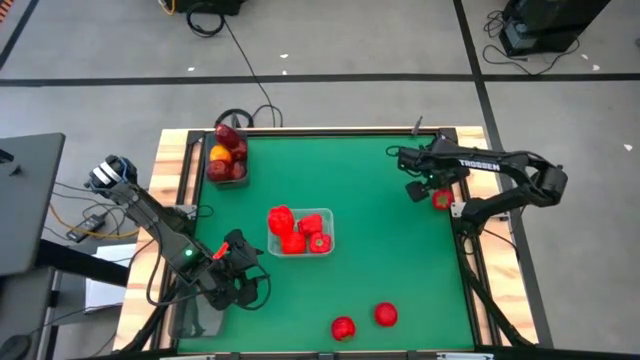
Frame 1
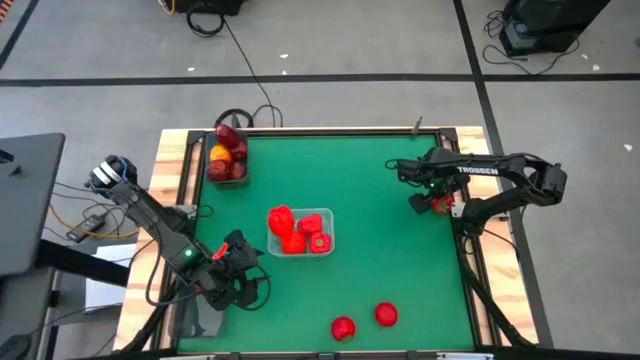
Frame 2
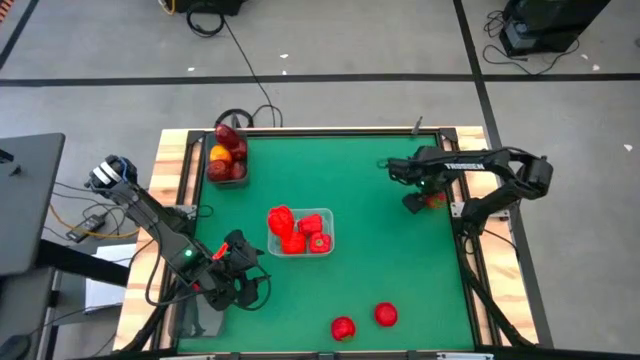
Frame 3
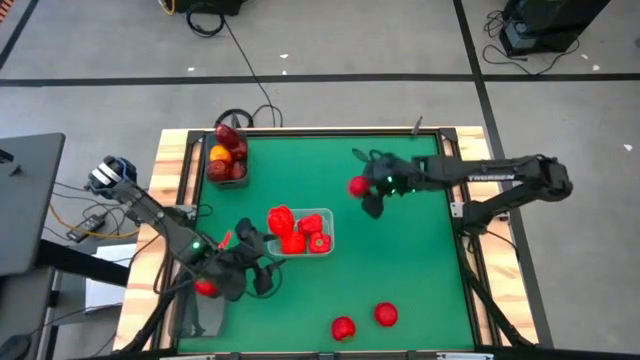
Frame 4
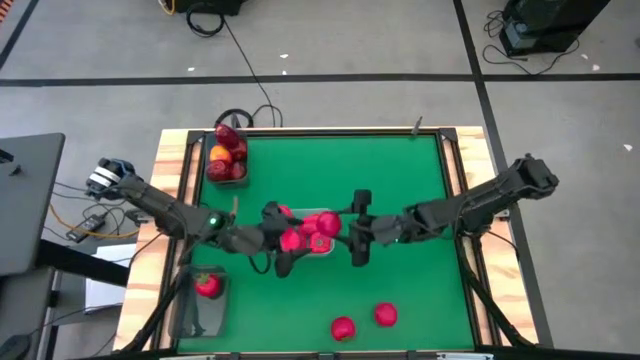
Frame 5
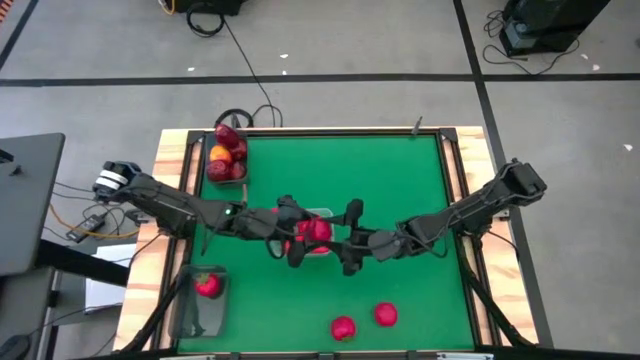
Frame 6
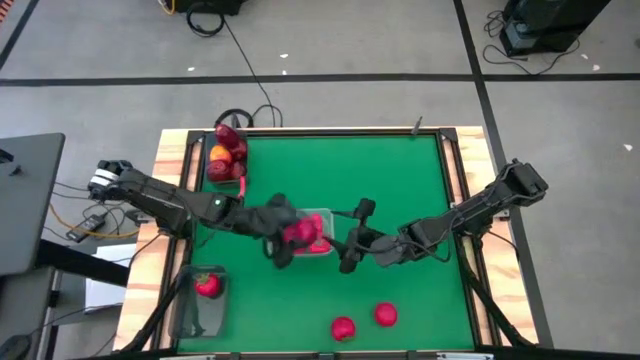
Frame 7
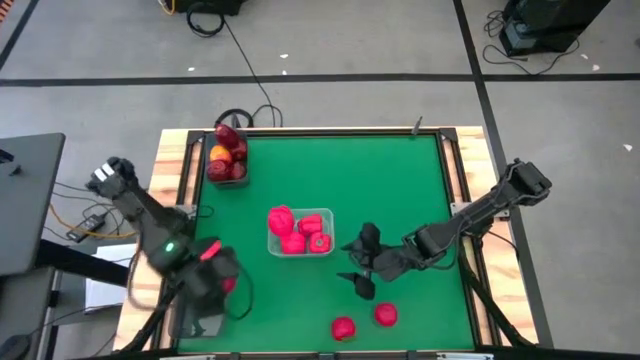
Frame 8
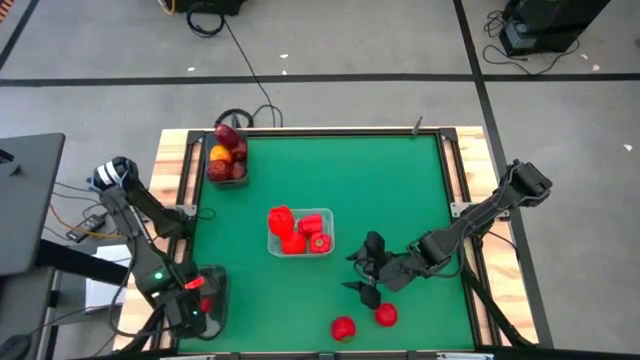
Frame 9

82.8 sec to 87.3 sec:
Task: Sort produce into baskets
Put the red tomato into the bottom black bin

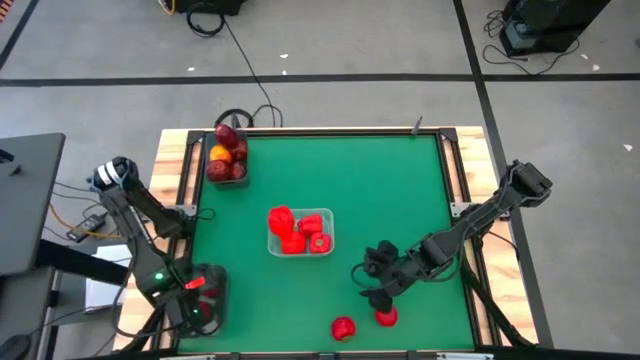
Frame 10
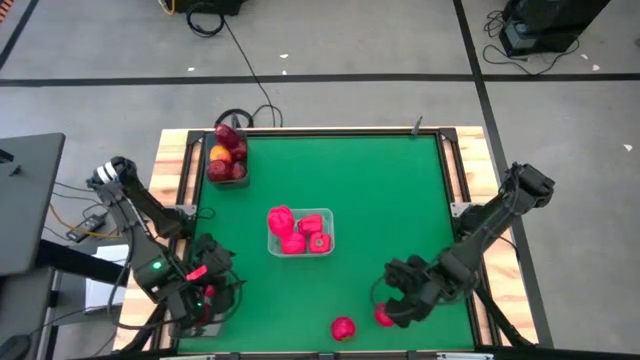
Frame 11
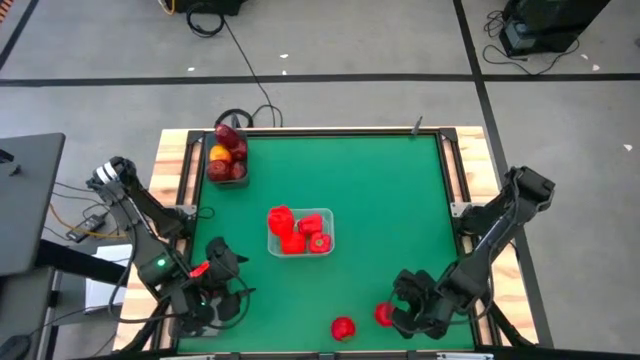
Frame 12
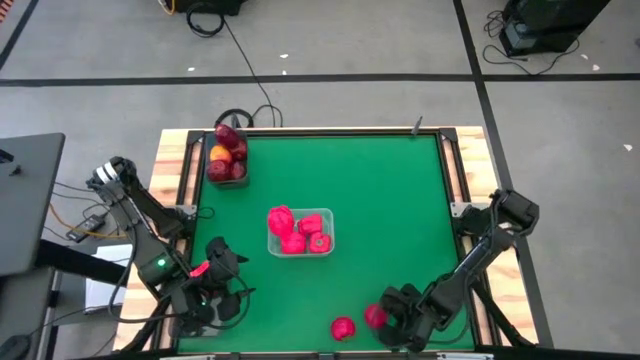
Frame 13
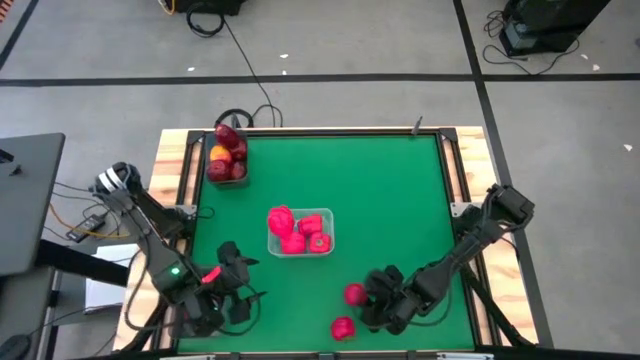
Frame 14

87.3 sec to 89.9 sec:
Put the red tomato into the bottom black bin

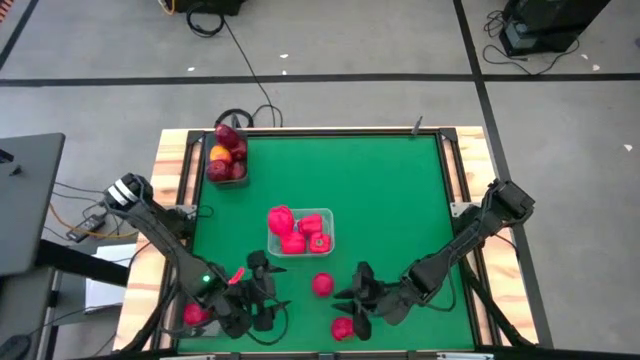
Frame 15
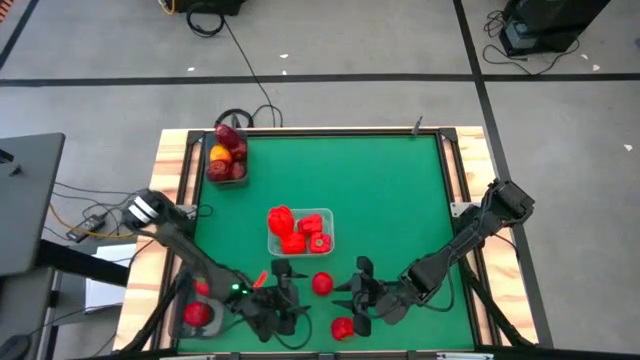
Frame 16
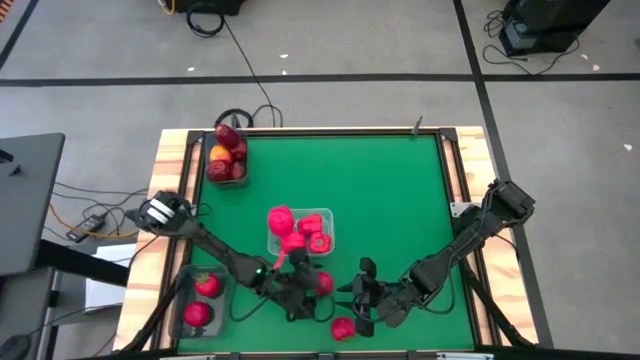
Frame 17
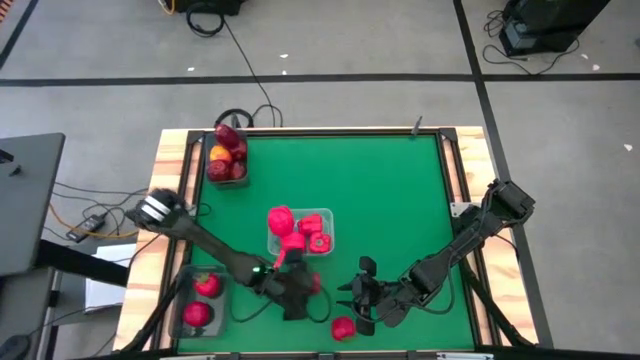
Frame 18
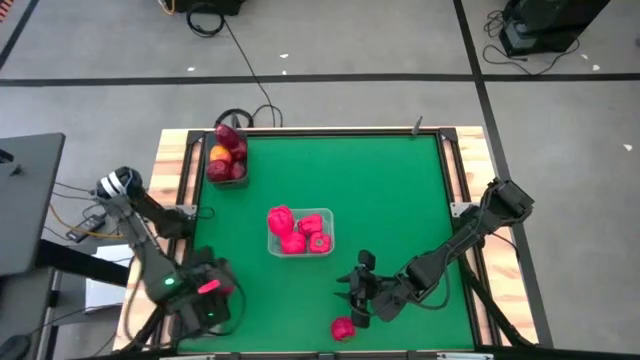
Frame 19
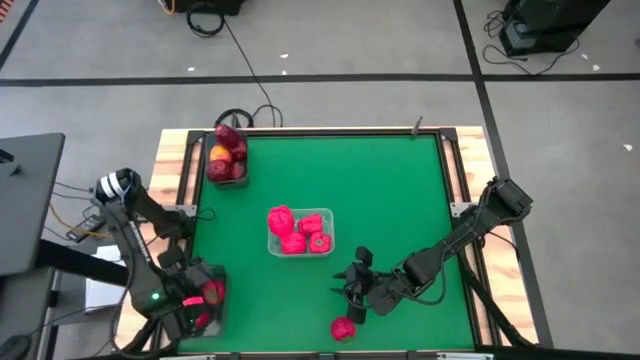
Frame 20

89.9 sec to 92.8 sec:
Put the red tomato into the bottom black bin

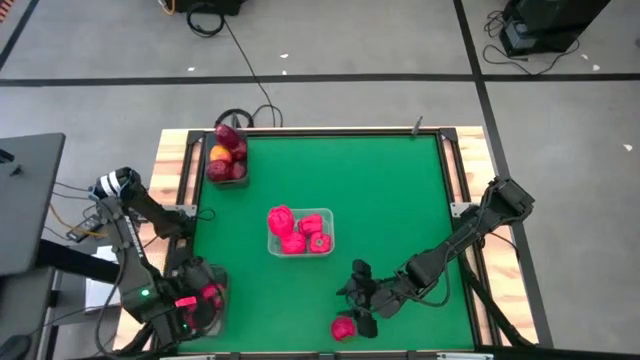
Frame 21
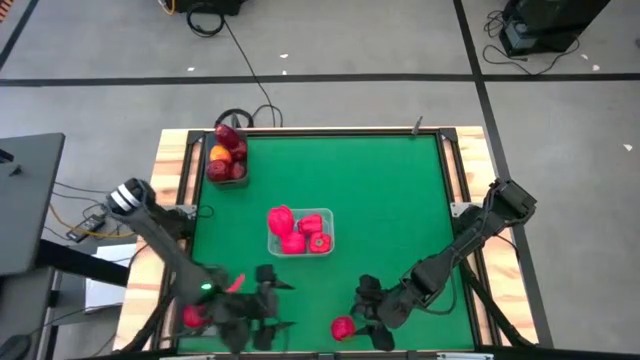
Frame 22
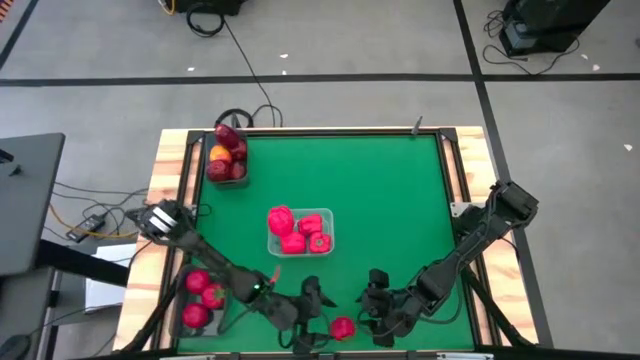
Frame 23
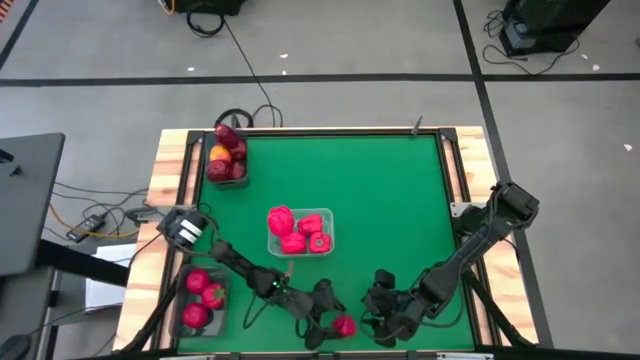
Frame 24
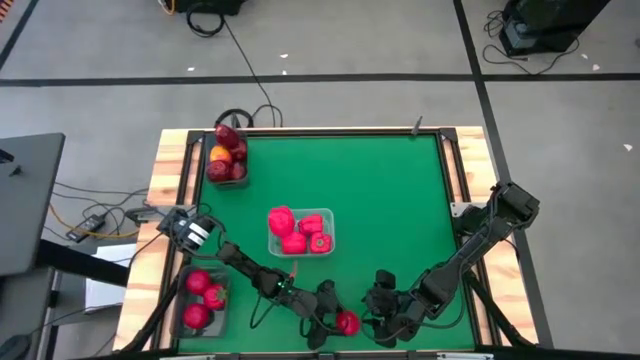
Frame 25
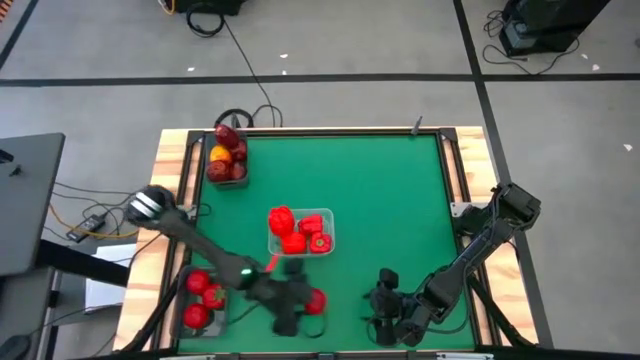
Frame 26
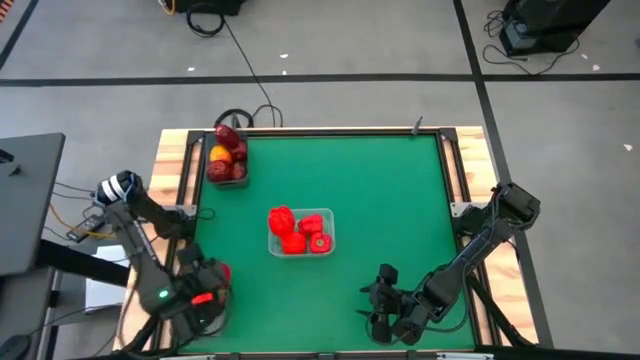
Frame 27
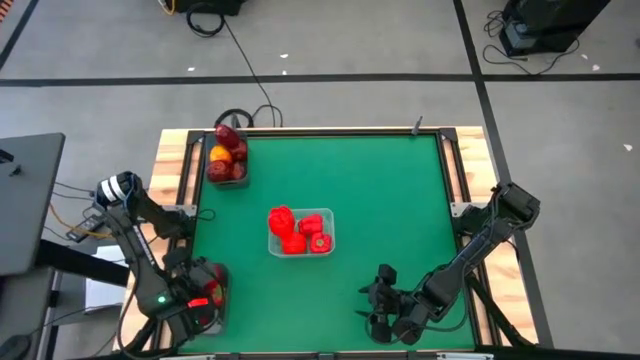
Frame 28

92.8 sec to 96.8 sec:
Put the red tomato into the bottom black bin

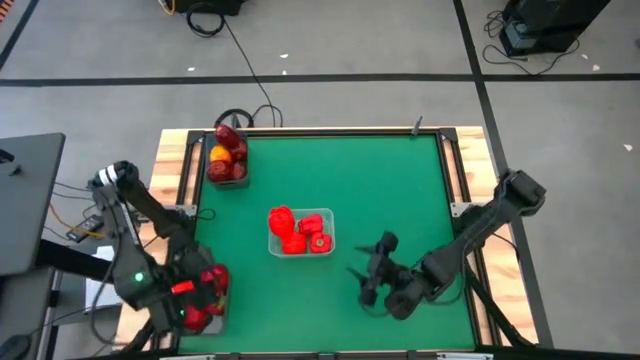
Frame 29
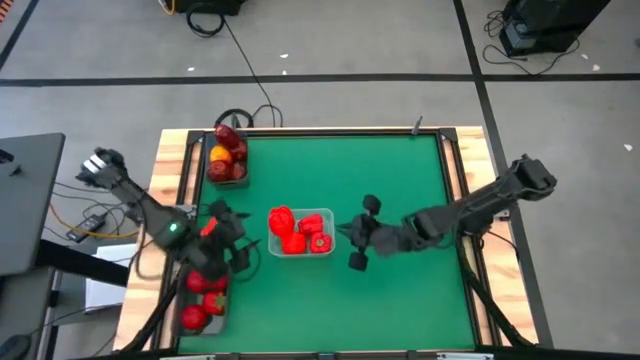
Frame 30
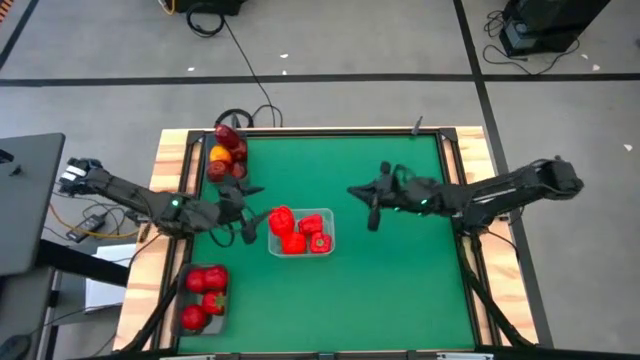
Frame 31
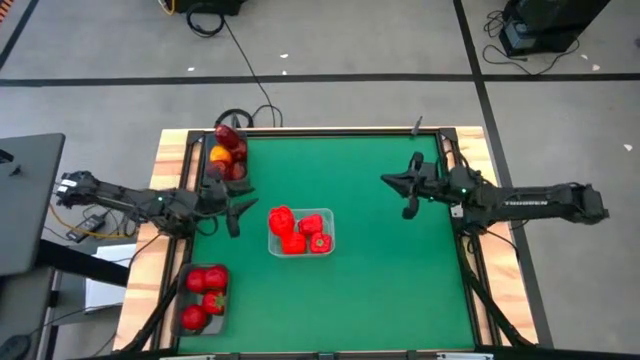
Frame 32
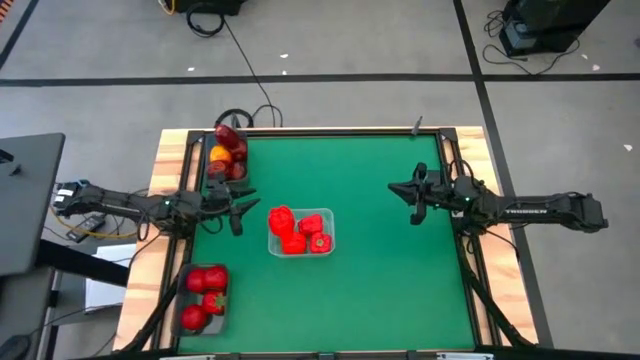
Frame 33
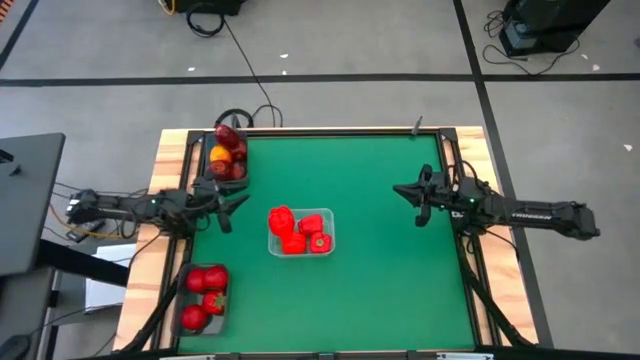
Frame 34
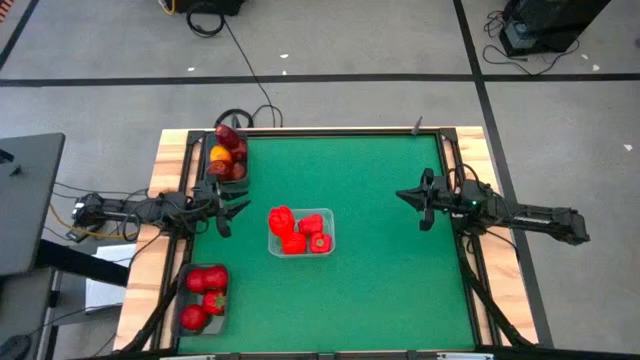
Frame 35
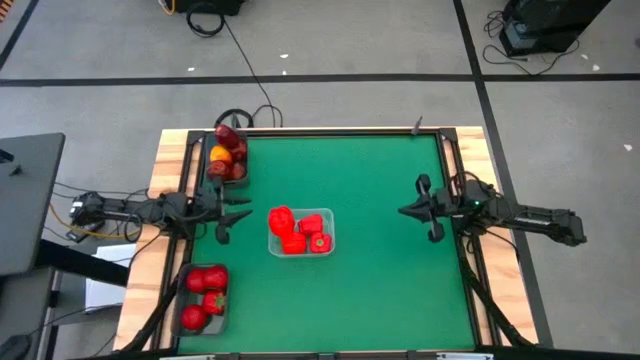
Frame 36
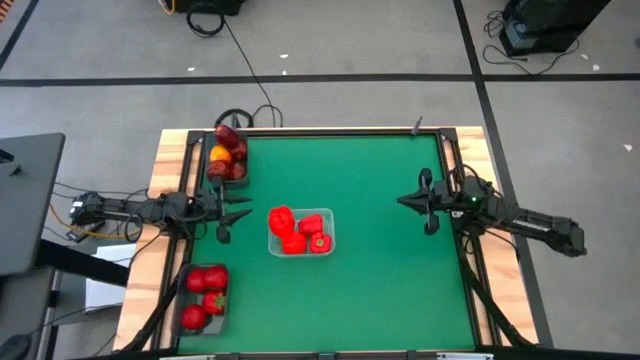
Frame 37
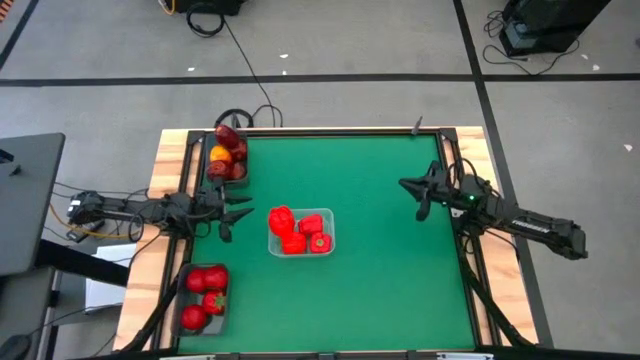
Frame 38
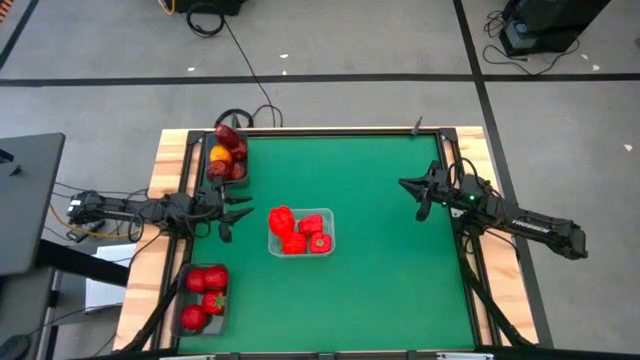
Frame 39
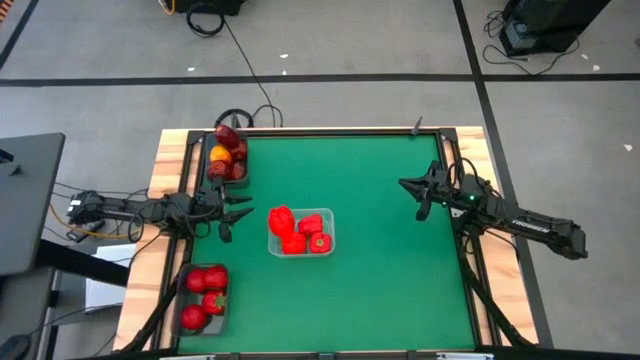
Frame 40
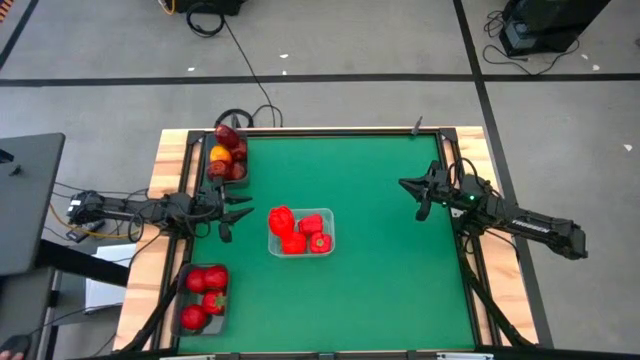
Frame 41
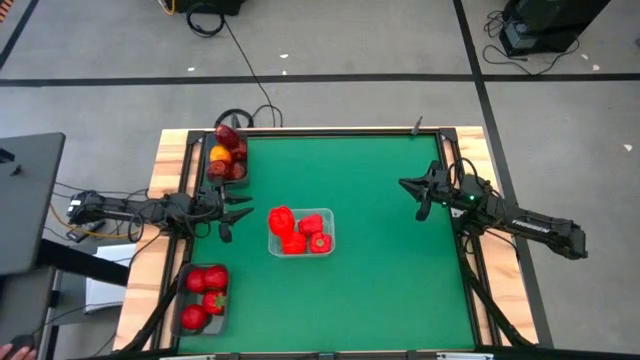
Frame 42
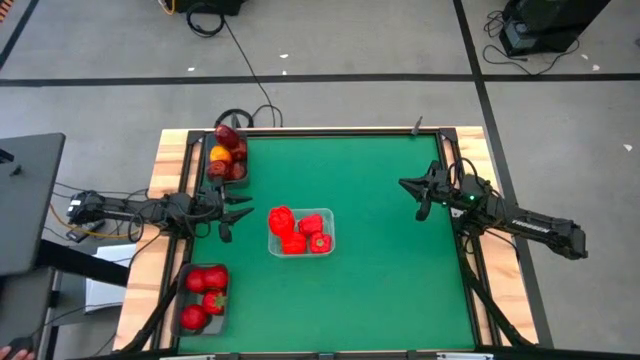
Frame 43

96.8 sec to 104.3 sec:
Return To Home Position
